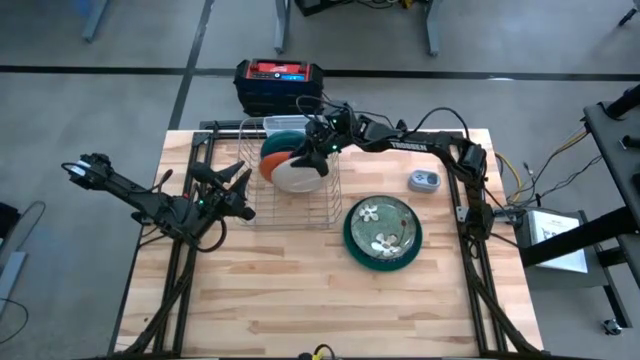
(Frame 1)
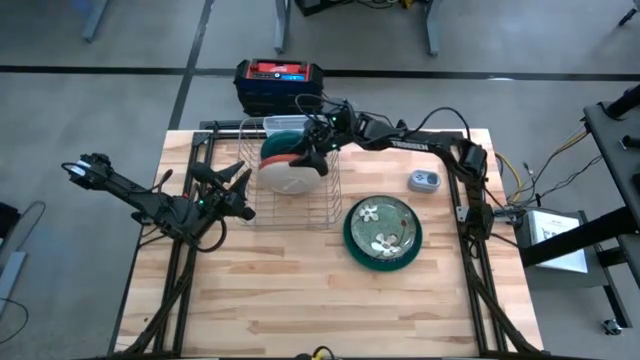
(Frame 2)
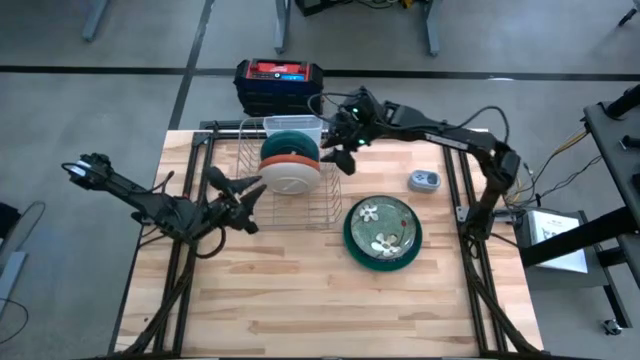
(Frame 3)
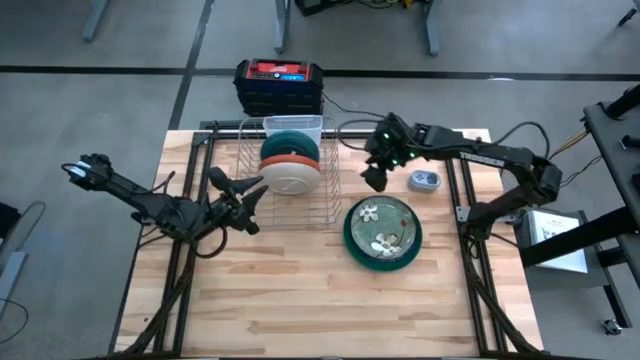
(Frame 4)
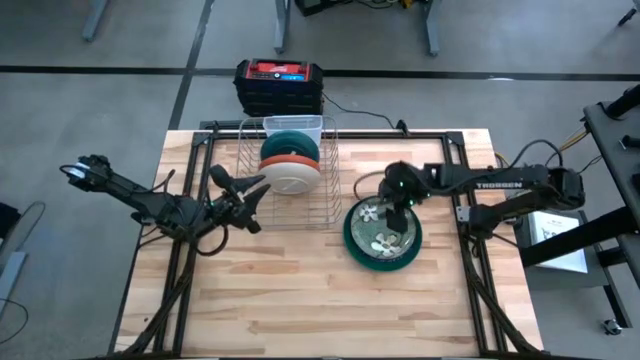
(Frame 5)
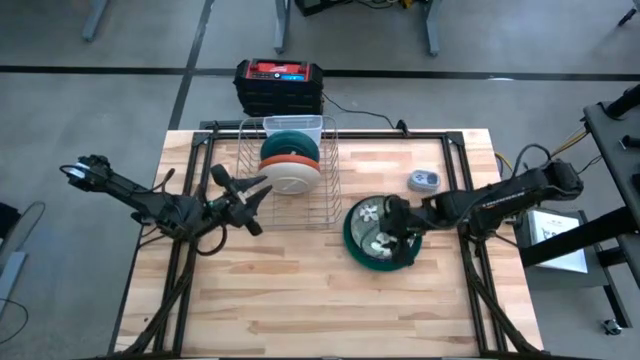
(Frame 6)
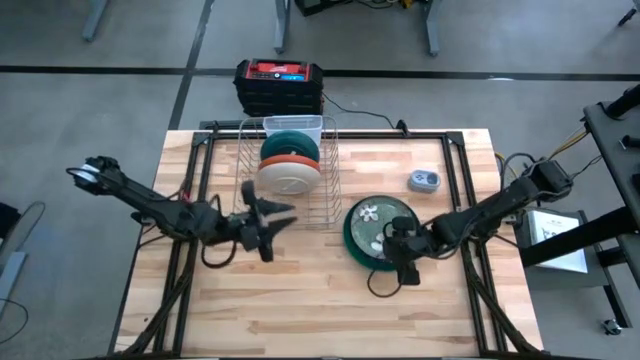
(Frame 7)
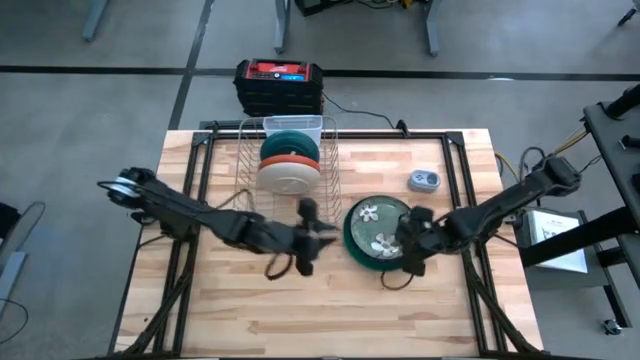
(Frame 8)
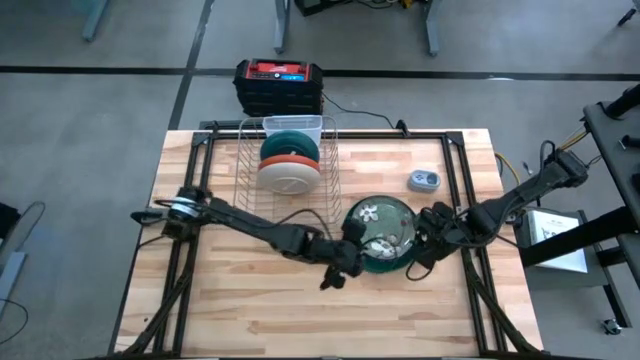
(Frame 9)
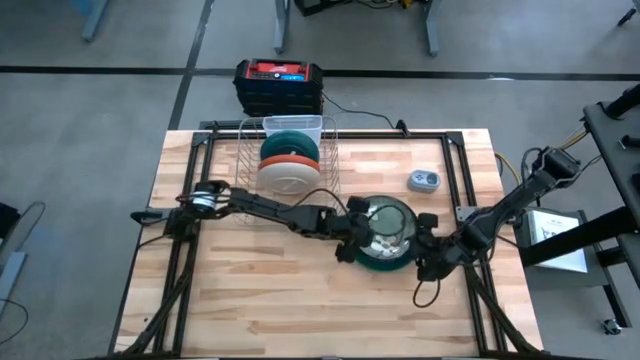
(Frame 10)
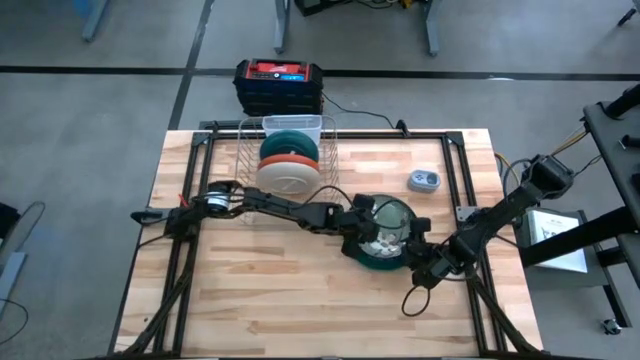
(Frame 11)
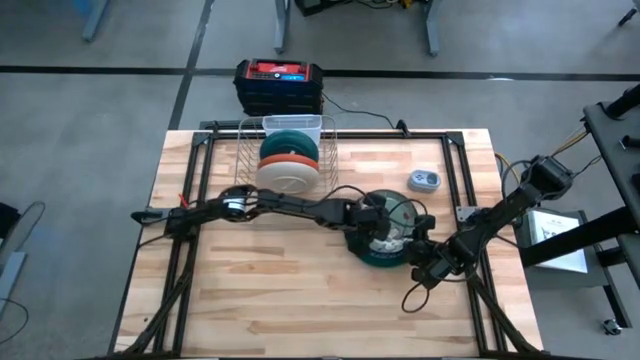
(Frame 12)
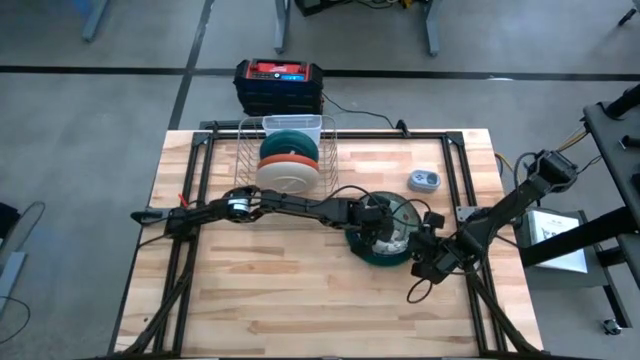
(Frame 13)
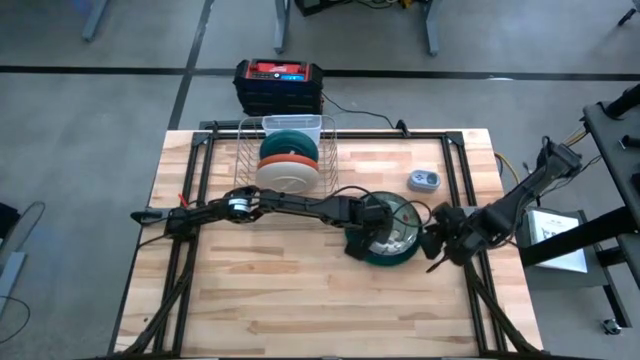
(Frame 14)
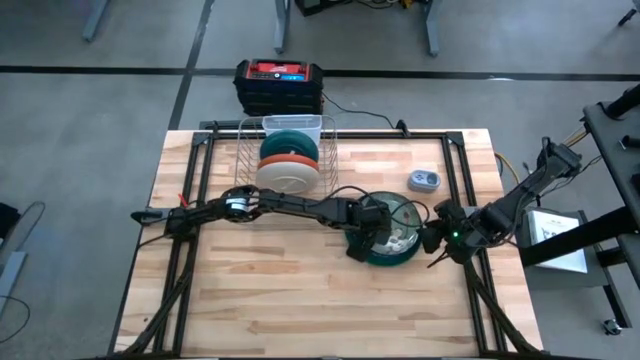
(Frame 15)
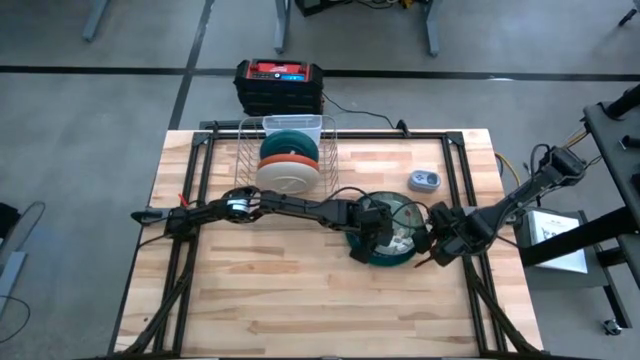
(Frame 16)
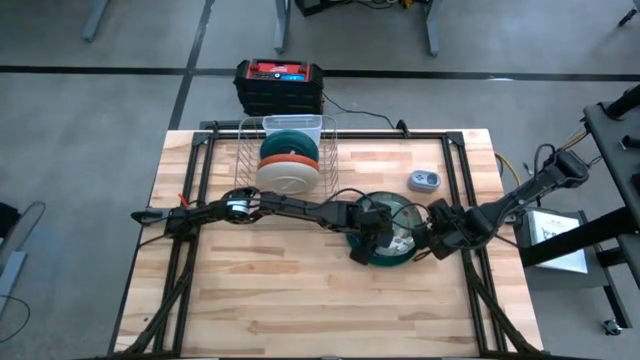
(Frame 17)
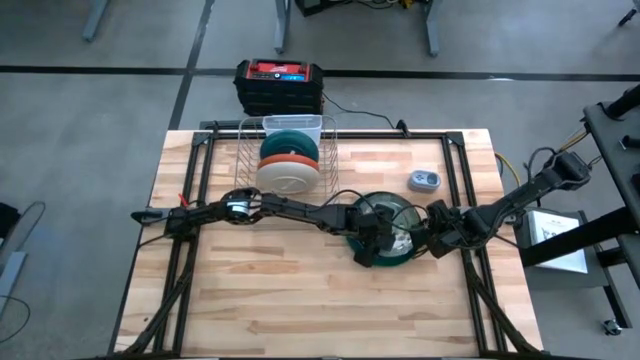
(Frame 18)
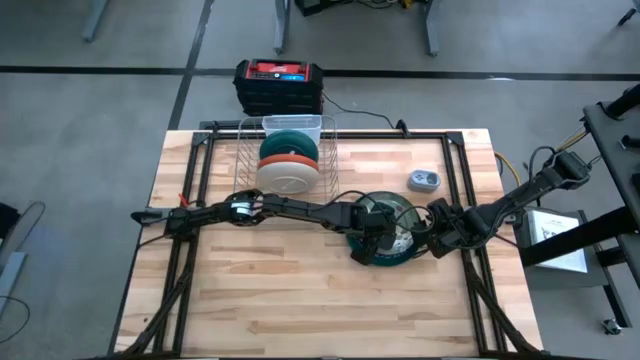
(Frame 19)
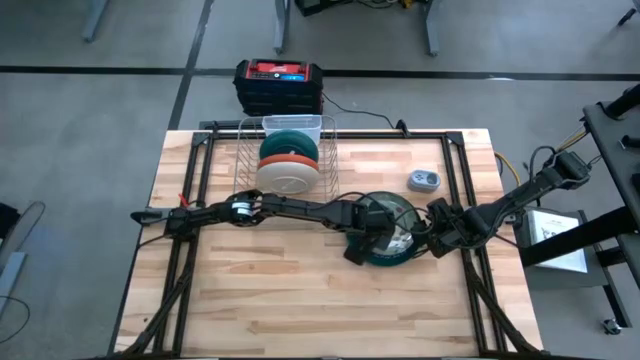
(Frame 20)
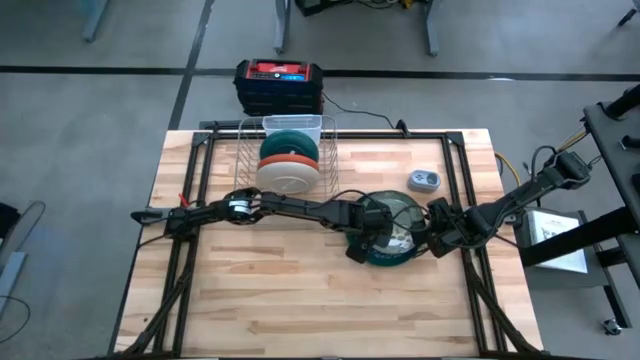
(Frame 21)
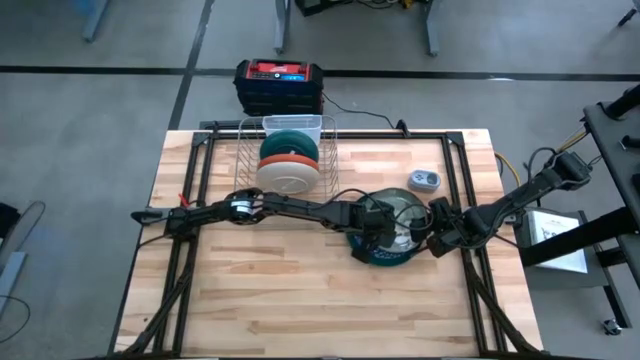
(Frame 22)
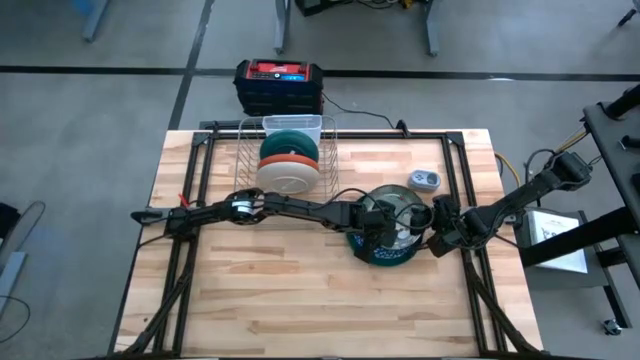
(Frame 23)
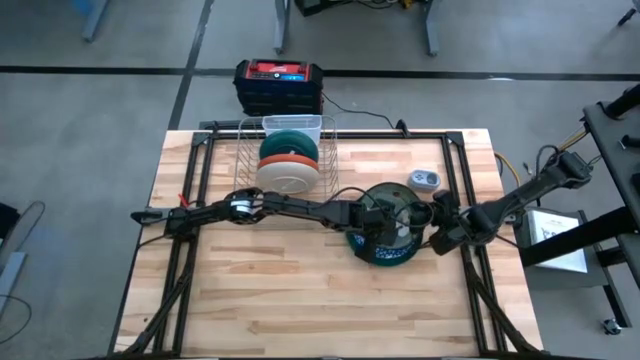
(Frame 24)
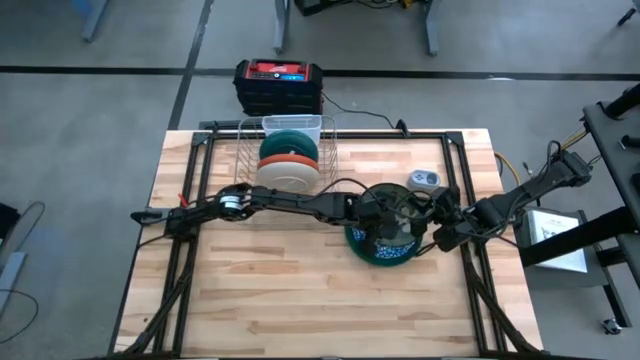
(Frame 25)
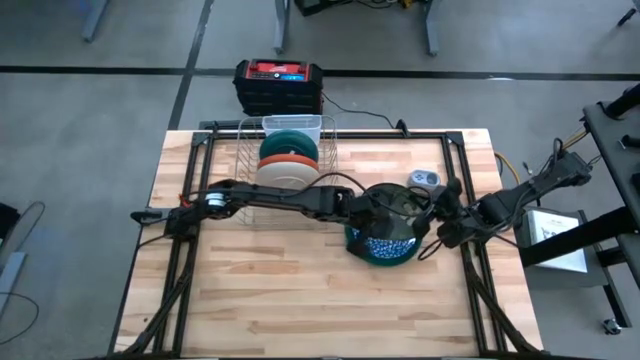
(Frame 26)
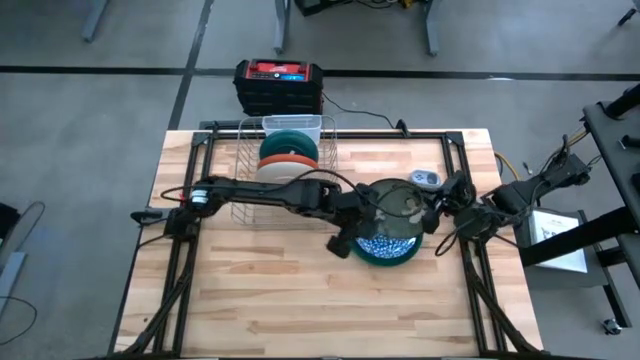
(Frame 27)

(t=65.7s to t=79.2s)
Task: Sort dishes
Put the green ceramic plate into the dish rack

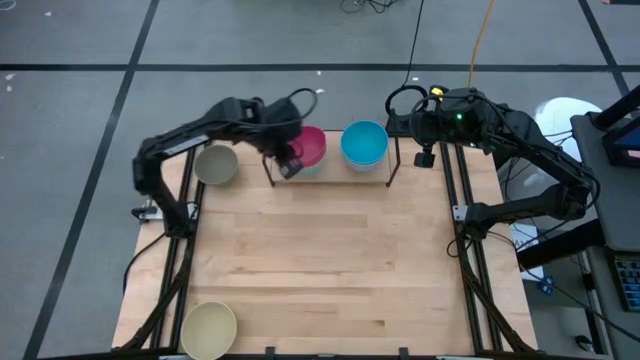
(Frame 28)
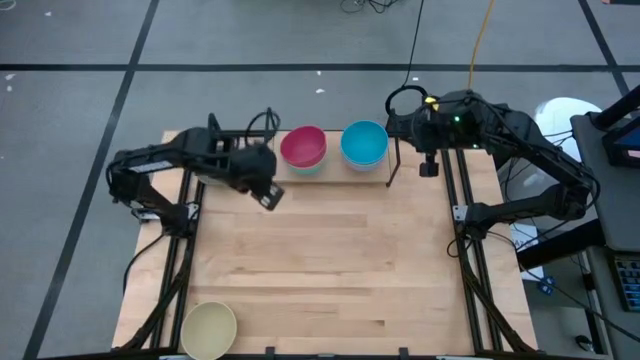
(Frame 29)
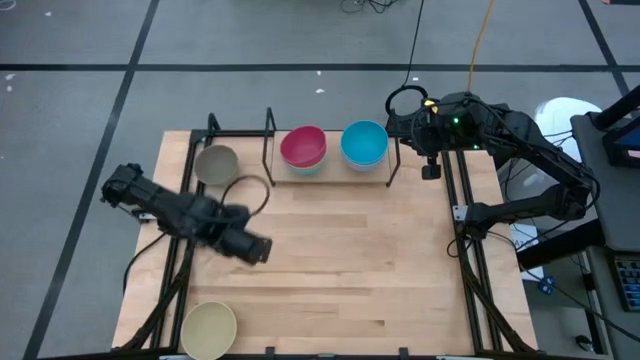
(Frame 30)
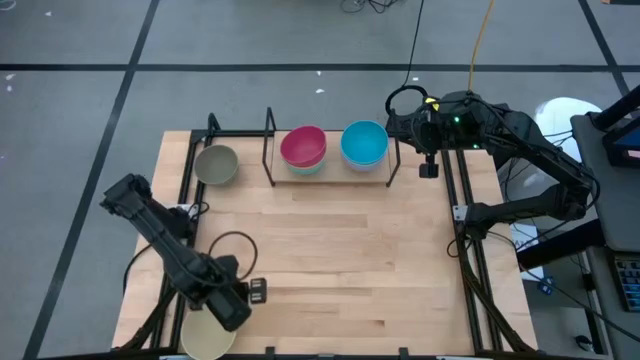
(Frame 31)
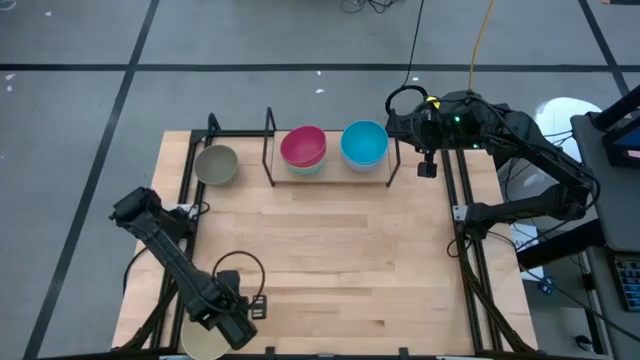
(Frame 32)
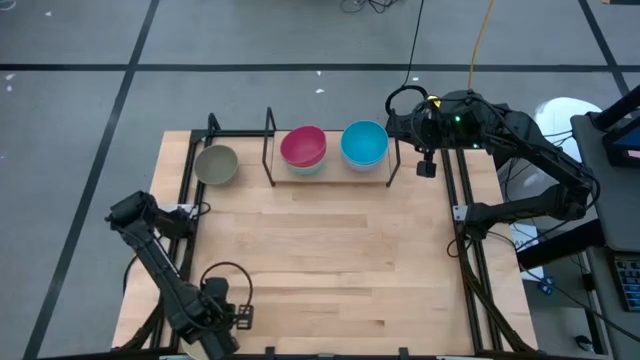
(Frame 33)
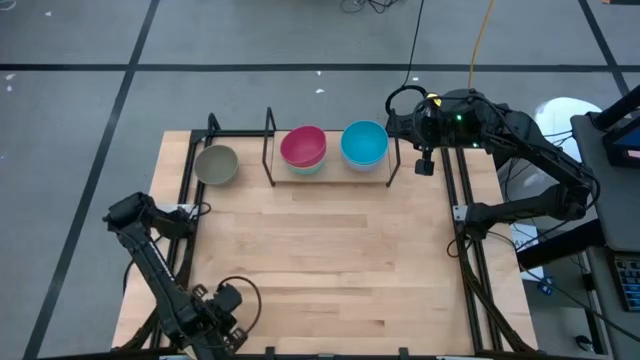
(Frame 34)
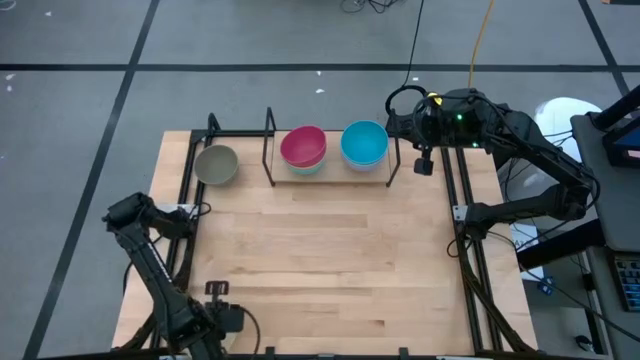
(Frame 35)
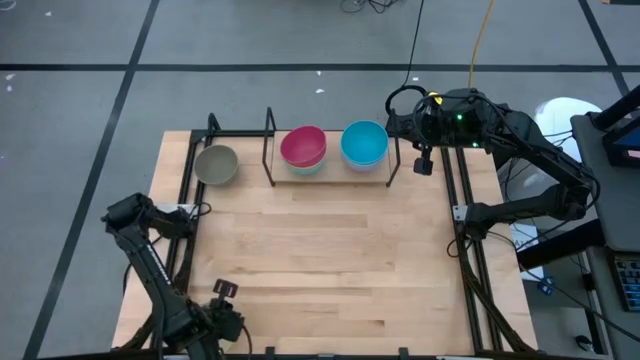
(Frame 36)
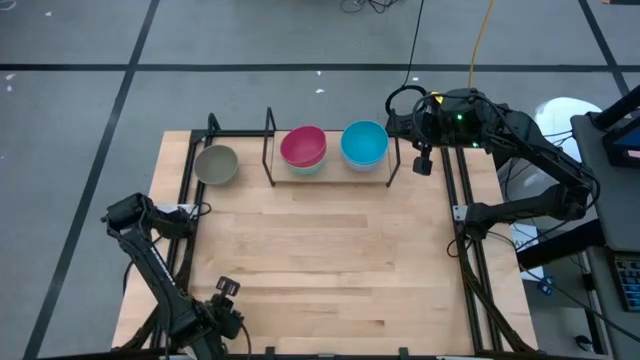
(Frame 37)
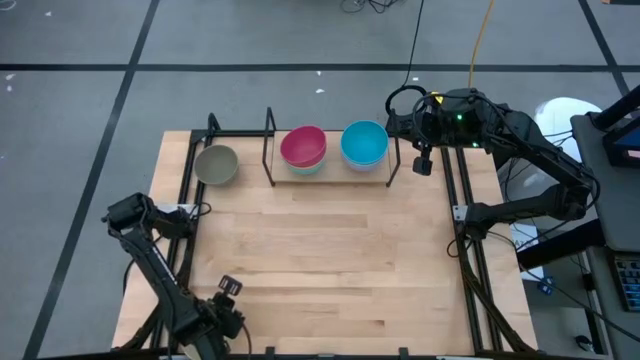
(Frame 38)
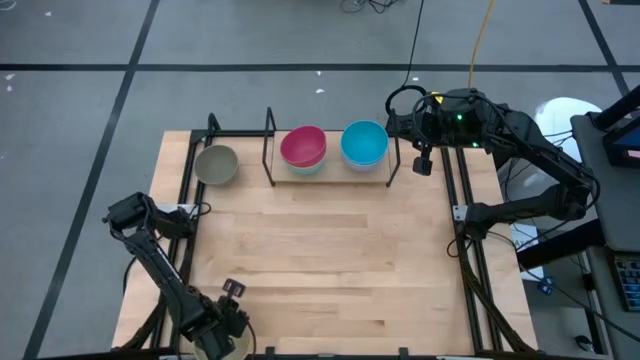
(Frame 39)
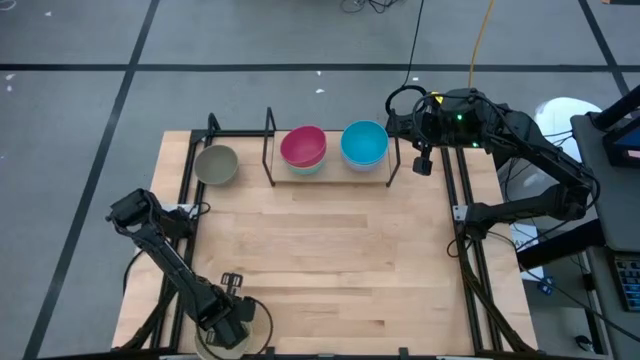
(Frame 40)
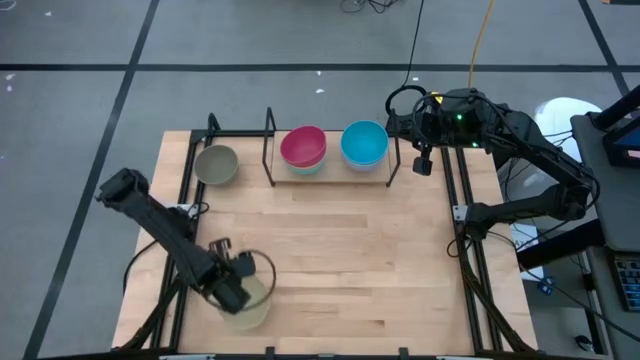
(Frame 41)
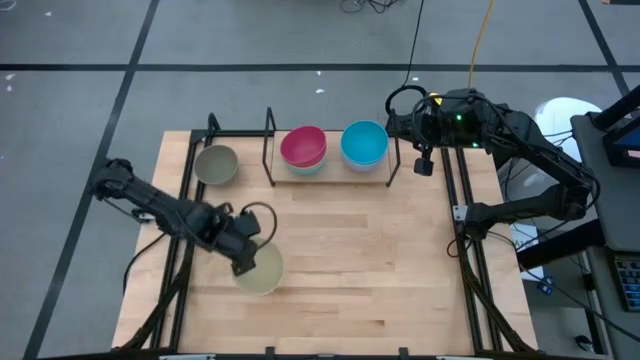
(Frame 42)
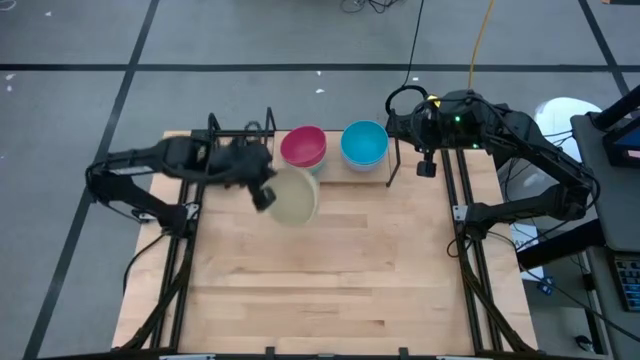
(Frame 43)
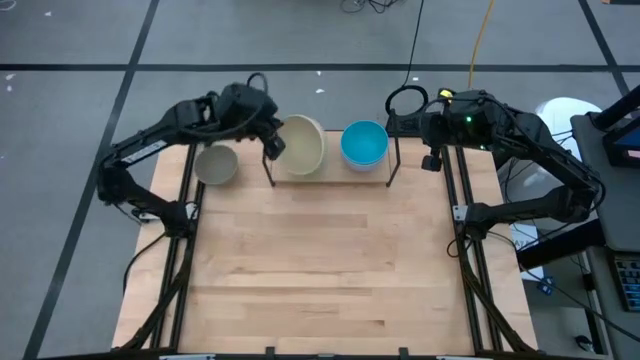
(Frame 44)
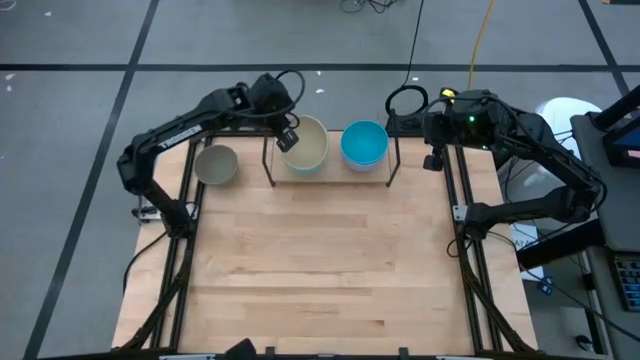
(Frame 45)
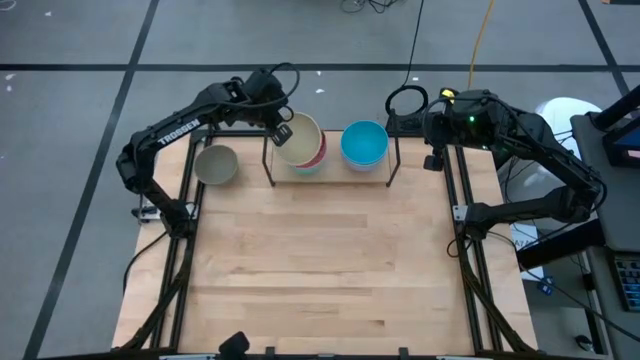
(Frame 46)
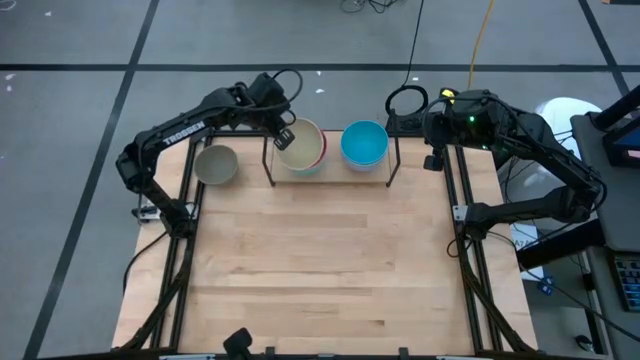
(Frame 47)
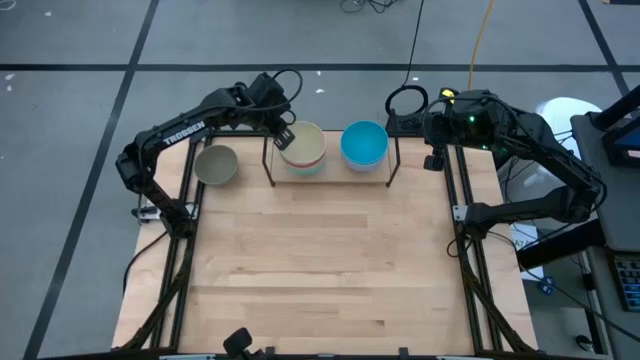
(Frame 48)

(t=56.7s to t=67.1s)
Task: Place and stack bowls onto a shelf
Stack the brown bowl on top of the red bowl on the shelf
